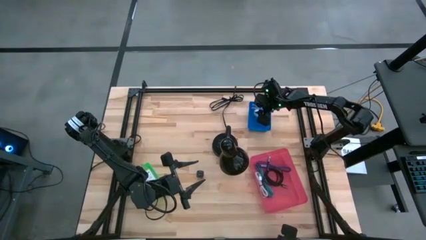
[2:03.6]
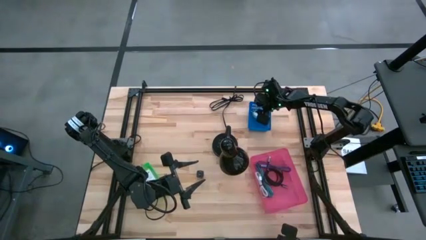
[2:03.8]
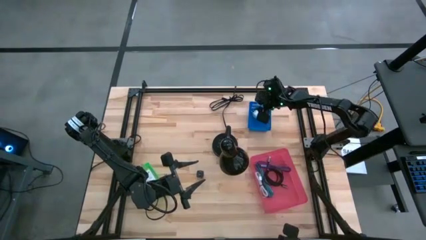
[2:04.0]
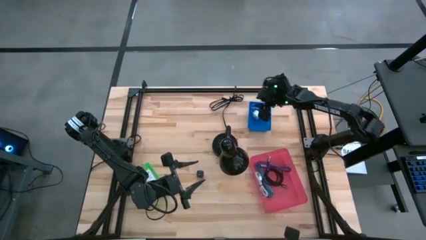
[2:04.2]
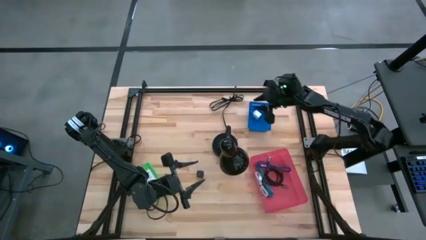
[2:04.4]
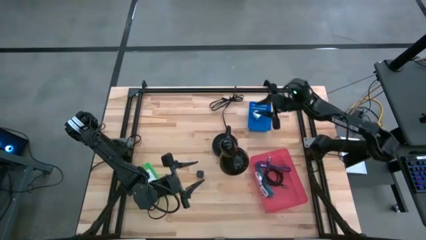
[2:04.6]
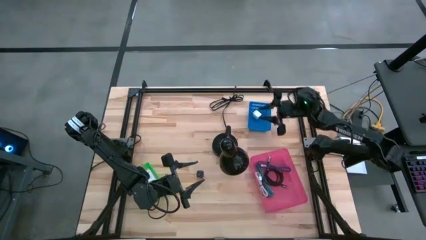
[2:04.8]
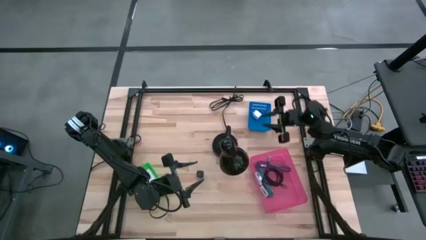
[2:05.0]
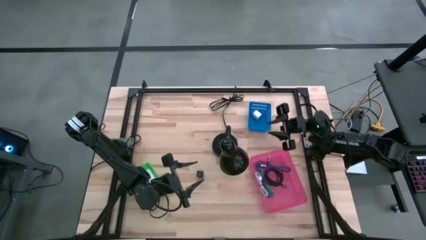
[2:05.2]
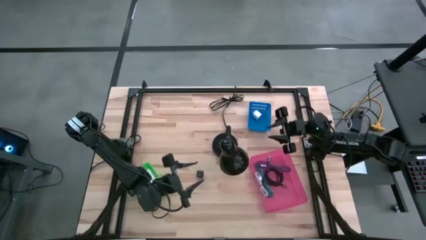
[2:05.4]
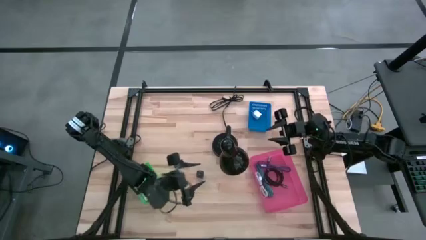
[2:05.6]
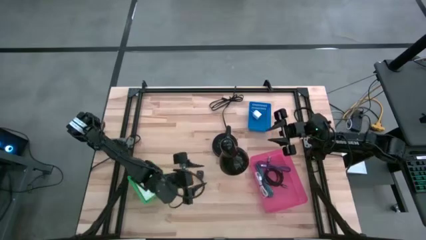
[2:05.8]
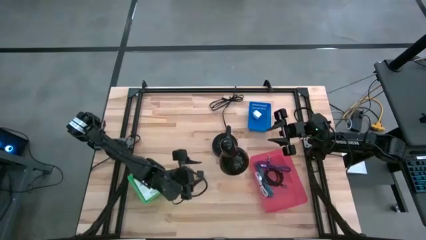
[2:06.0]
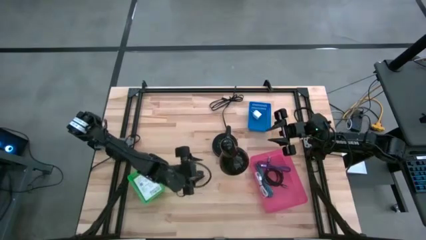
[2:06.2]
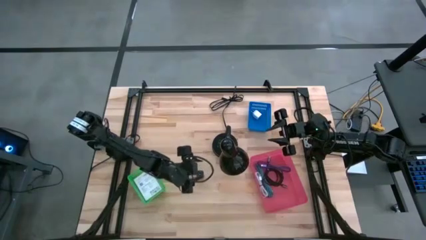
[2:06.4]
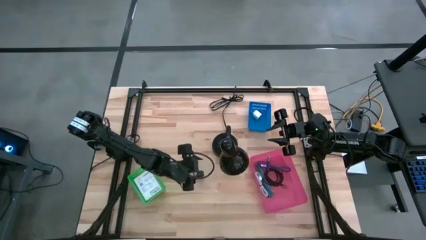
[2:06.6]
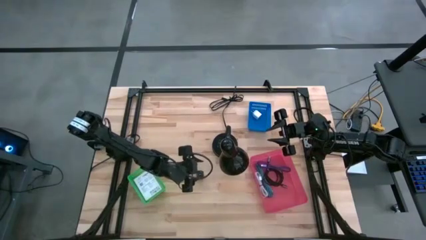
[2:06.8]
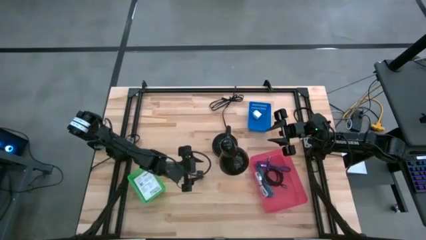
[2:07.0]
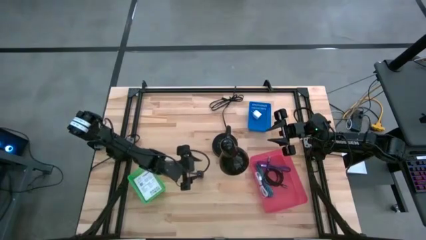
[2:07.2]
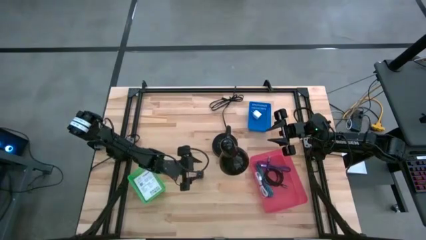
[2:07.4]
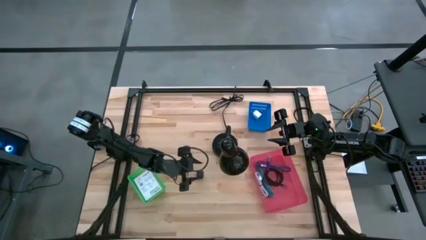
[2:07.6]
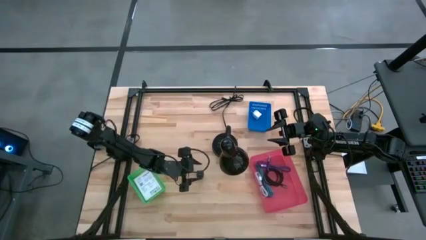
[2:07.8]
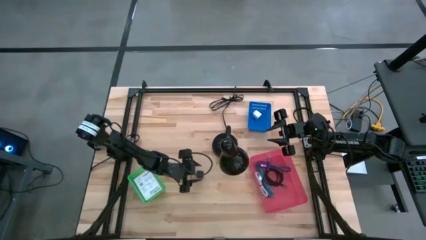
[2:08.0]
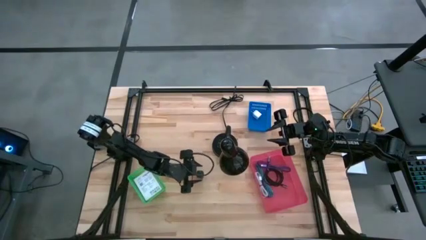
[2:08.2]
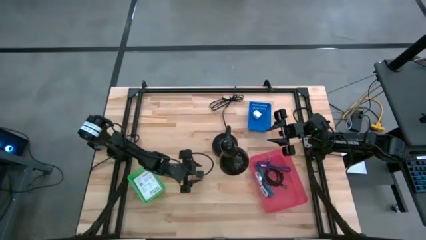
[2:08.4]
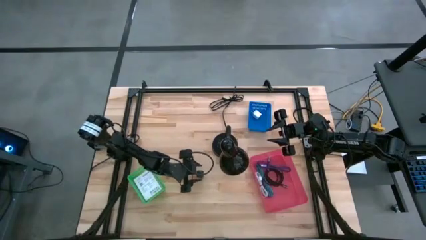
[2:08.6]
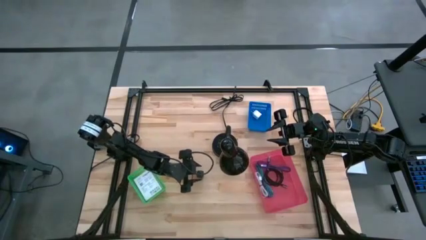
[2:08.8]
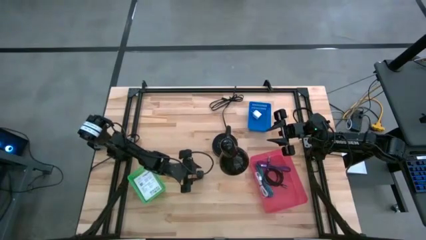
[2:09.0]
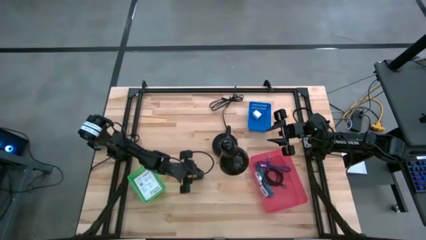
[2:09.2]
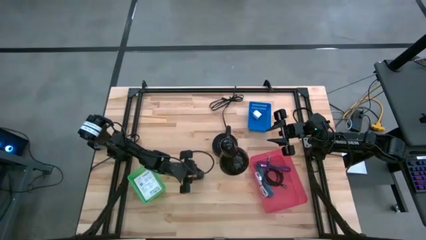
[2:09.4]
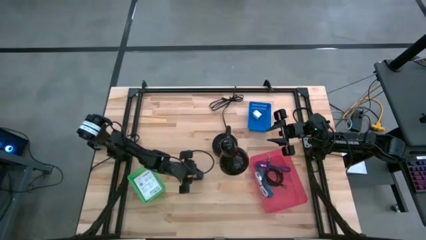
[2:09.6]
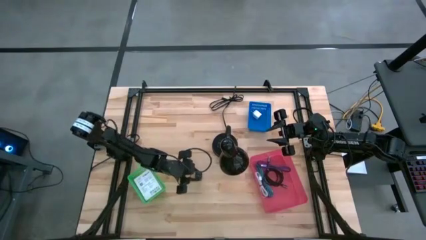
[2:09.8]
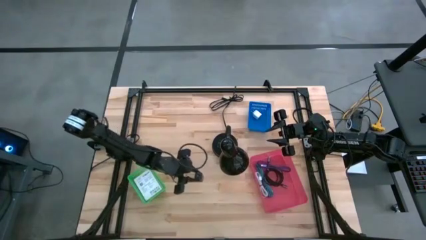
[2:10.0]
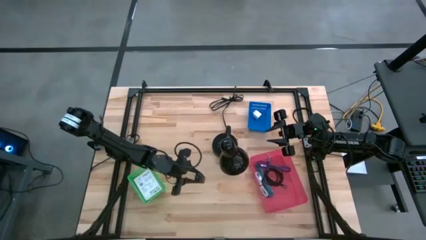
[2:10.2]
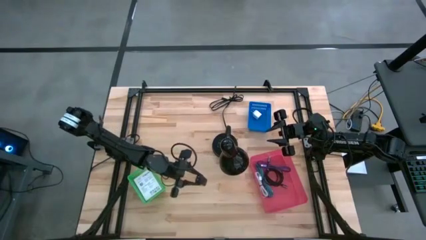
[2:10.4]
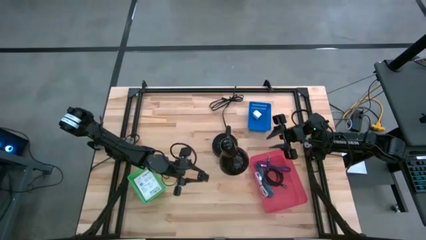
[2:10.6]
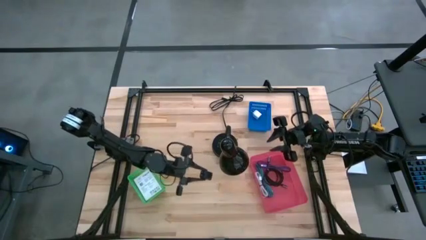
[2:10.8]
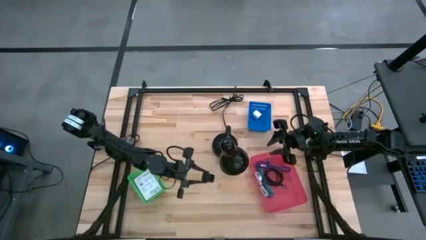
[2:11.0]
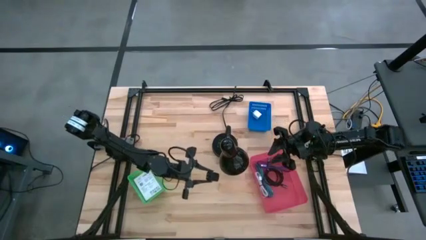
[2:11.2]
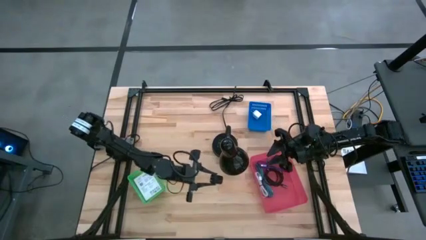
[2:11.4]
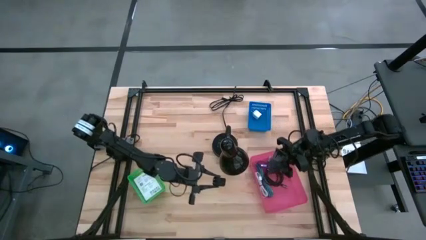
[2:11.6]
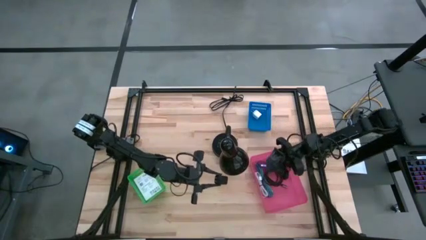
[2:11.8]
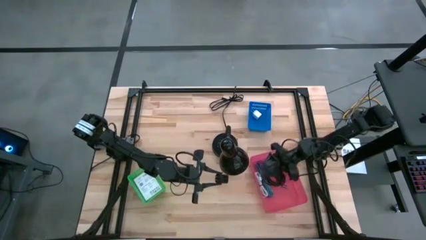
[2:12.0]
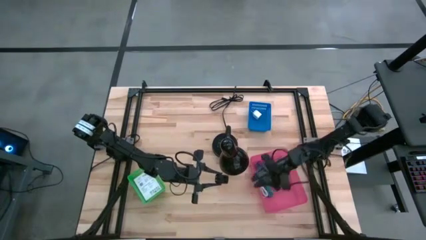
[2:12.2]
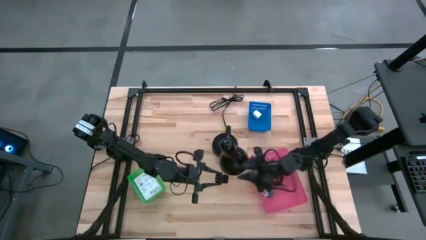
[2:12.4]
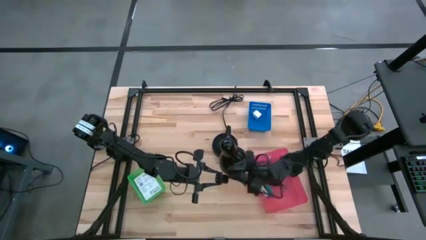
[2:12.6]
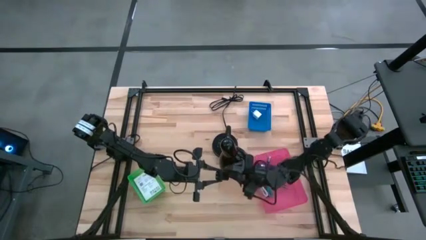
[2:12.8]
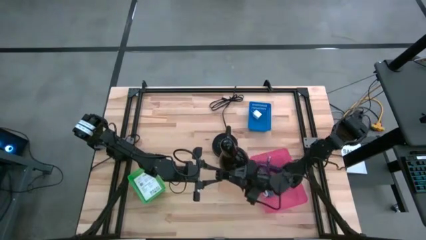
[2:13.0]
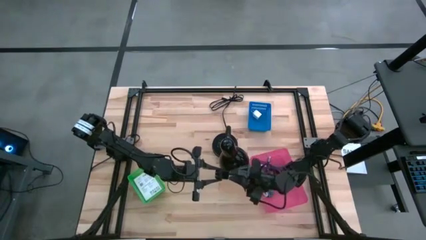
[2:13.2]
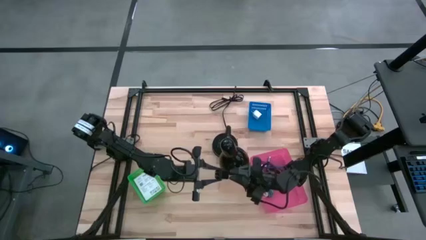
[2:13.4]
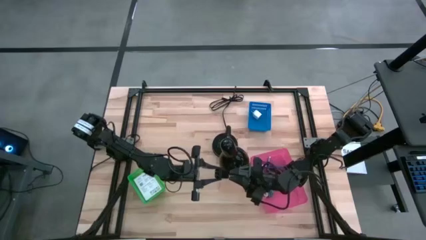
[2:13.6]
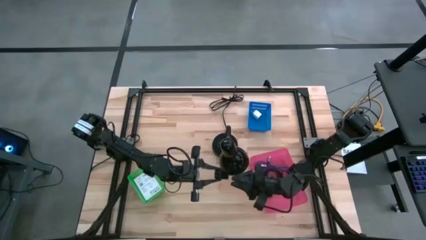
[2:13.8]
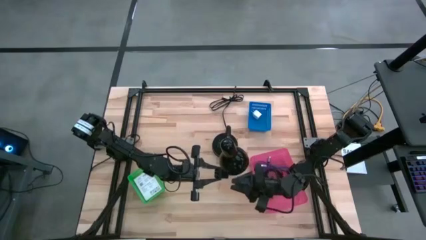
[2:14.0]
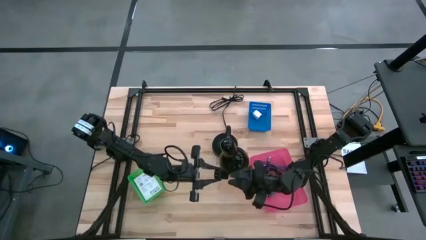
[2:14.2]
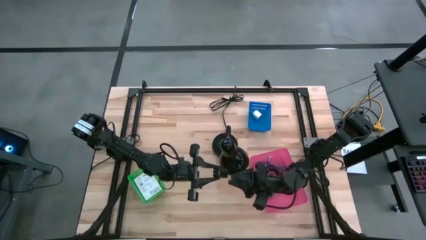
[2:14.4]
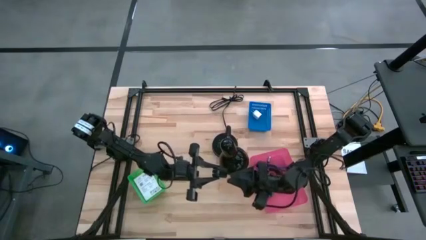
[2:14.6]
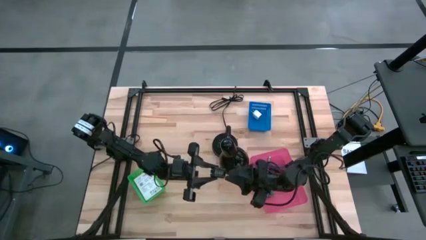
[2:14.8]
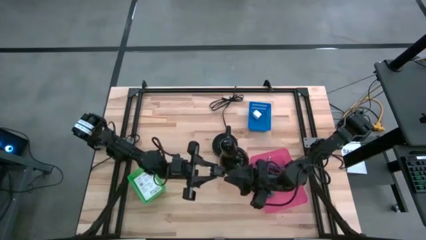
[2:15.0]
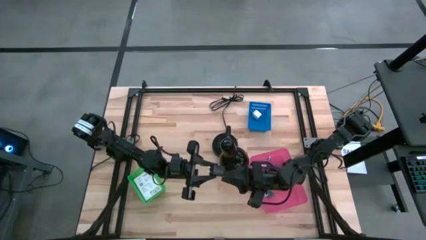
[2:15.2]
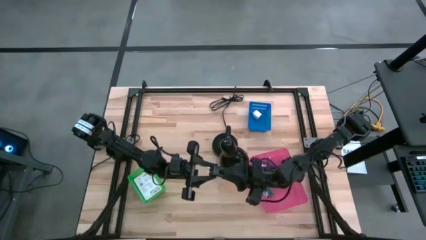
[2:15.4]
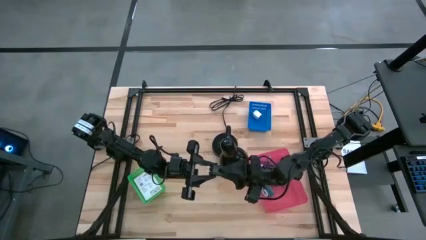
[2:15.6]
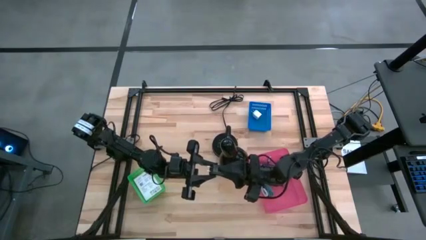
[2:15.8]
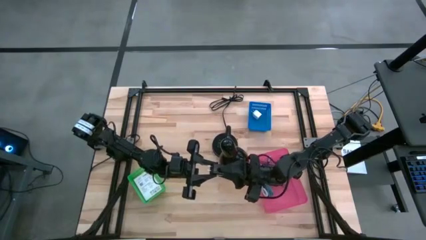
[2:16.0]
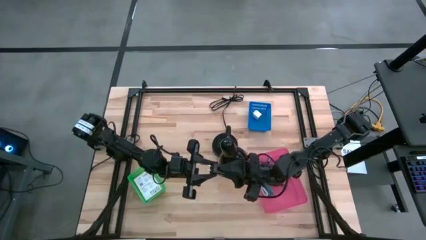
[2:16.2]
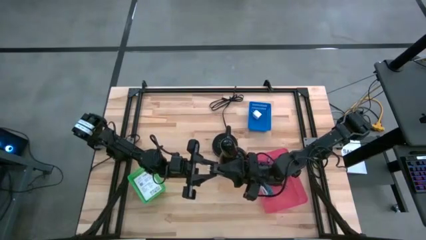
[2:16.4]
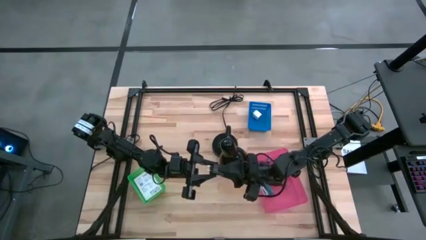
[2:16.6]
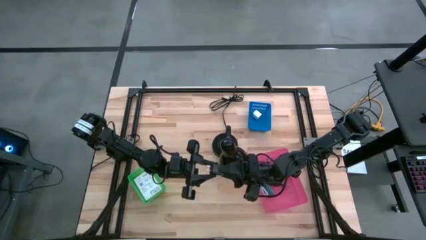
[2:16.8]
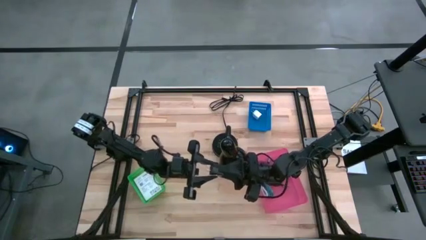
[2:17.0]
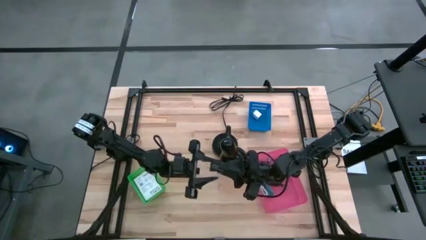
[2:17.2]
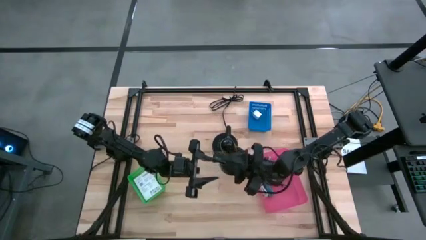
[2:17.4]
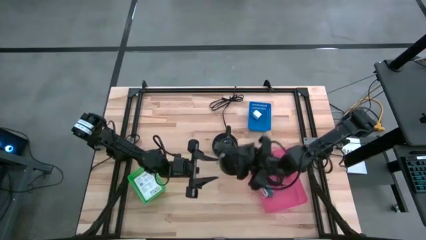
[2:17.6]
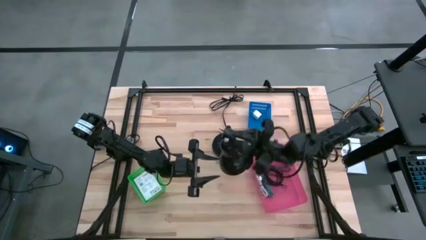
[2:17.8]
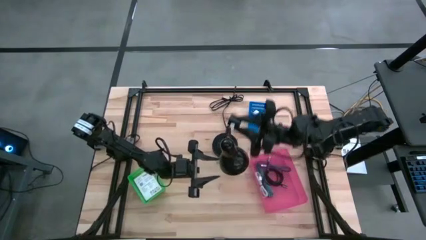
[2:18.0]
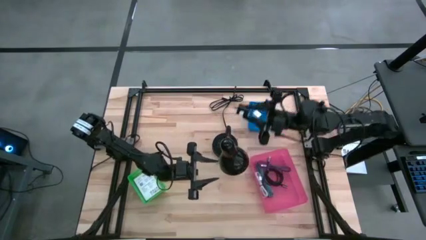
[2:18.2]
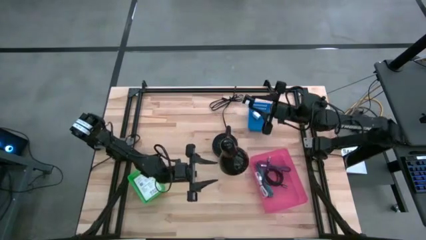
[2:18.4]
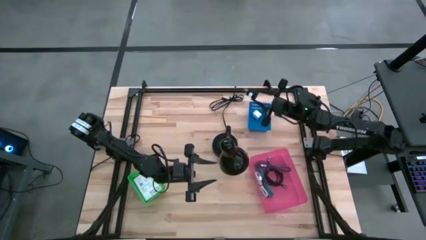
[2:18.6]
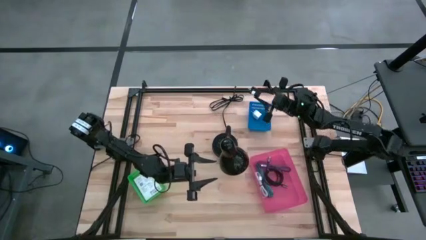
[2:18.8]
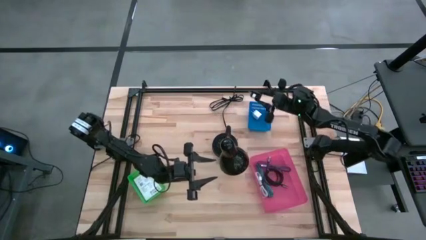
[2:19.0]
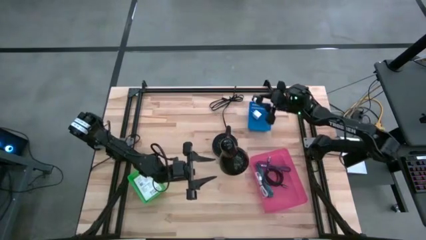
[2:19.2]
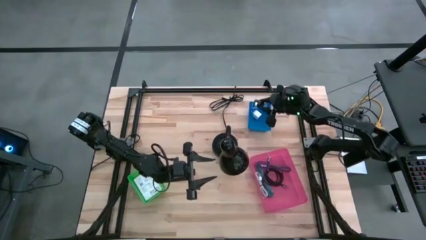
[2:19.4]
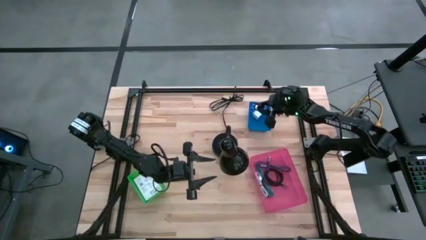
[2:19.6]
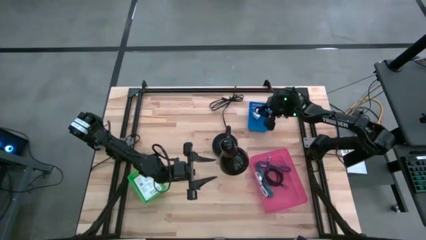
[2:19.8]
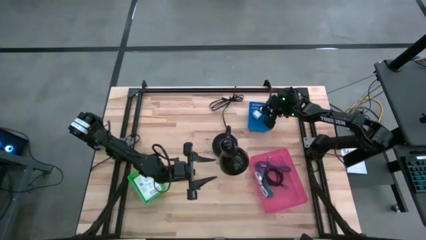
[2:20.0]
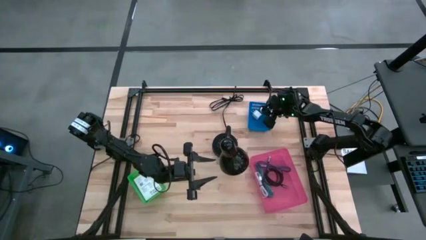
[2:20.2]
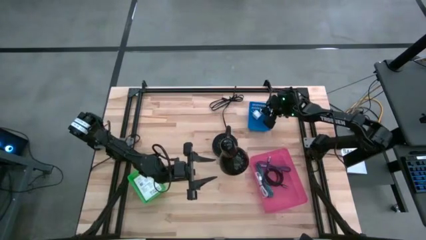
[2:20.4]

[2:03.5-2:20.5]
Task: Pick and place items into bin
Put the black charger adapter into the blue bin
